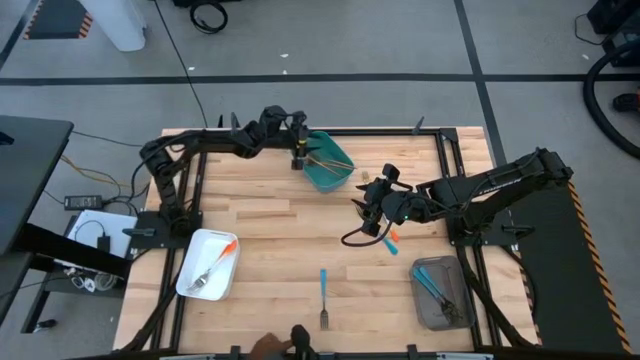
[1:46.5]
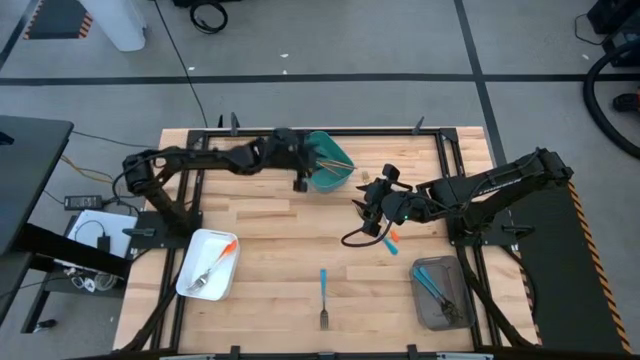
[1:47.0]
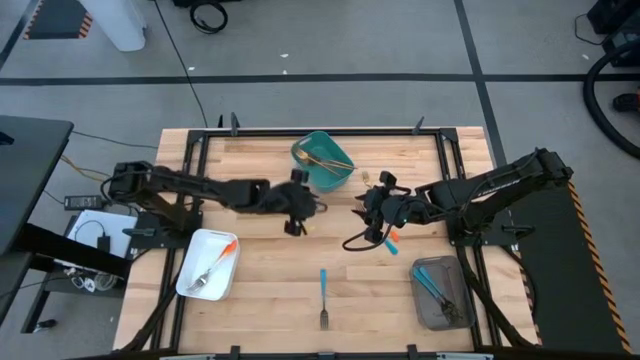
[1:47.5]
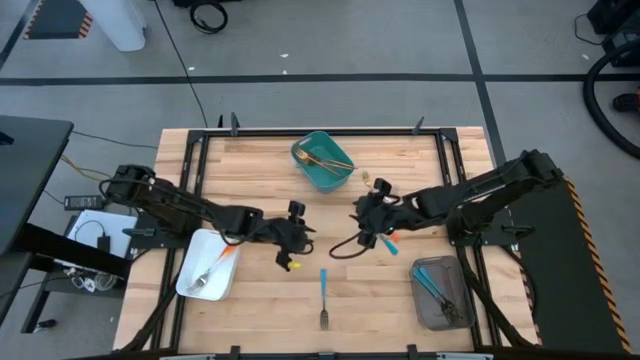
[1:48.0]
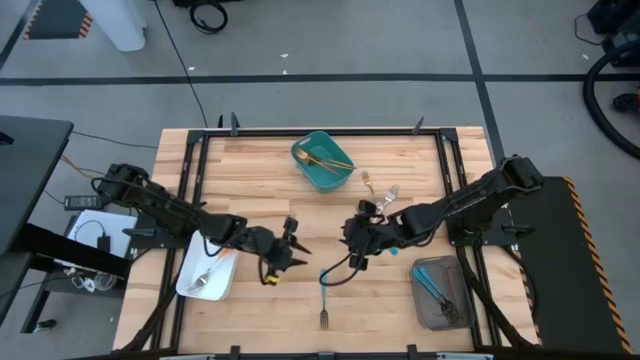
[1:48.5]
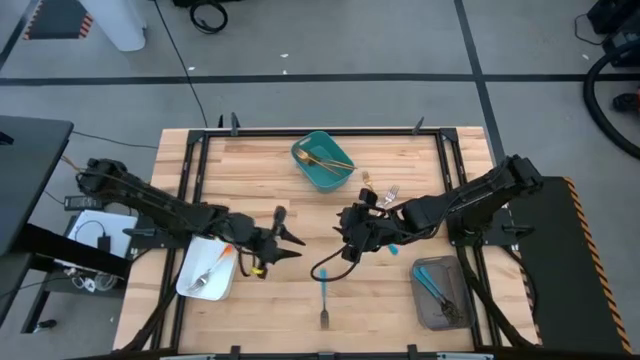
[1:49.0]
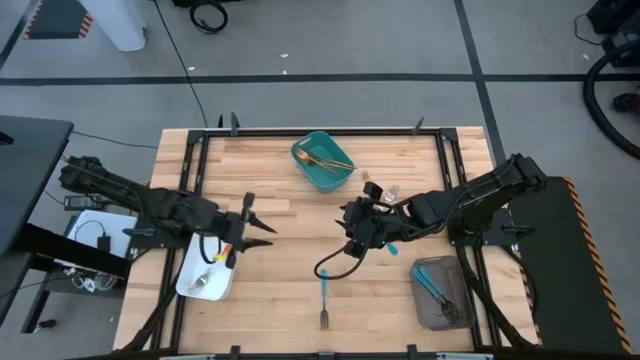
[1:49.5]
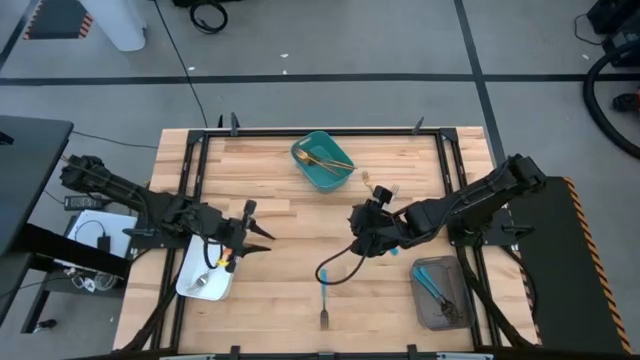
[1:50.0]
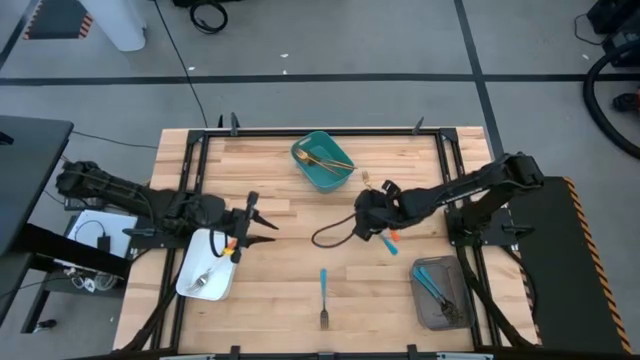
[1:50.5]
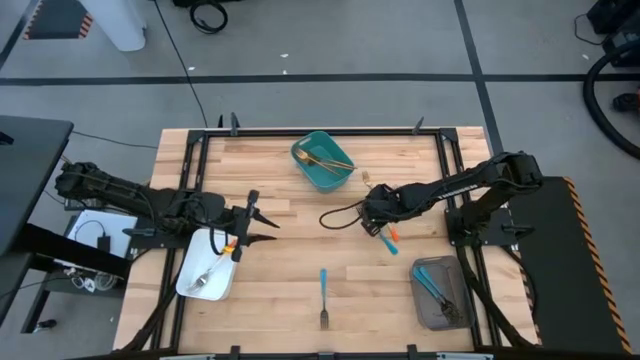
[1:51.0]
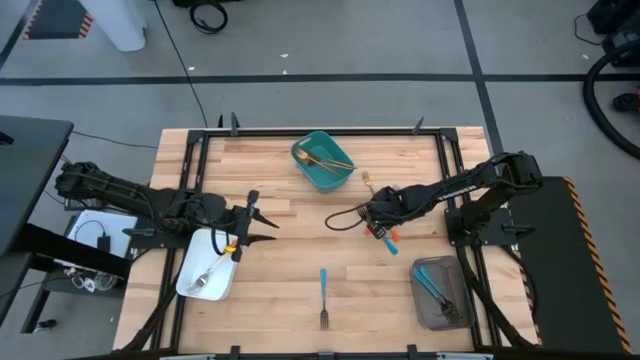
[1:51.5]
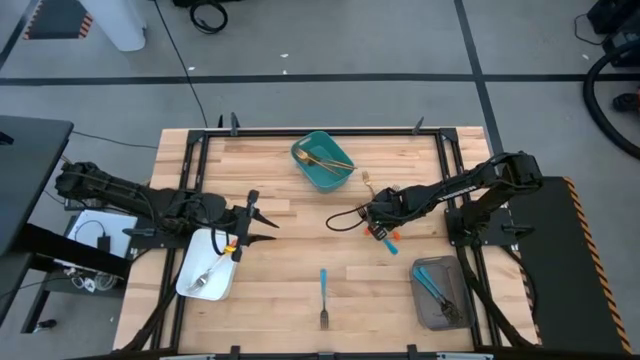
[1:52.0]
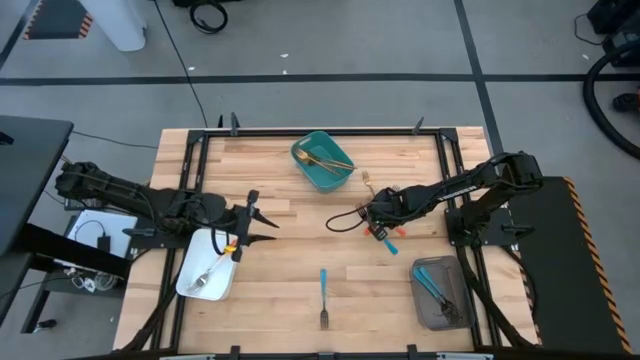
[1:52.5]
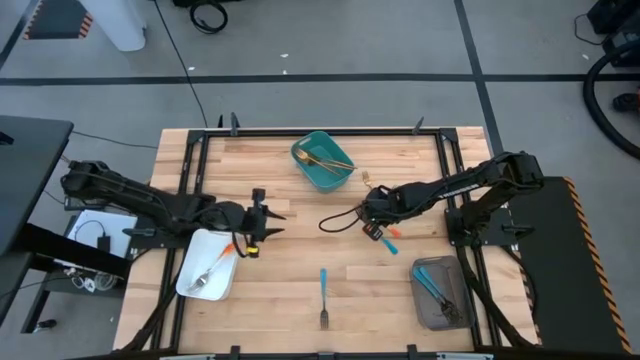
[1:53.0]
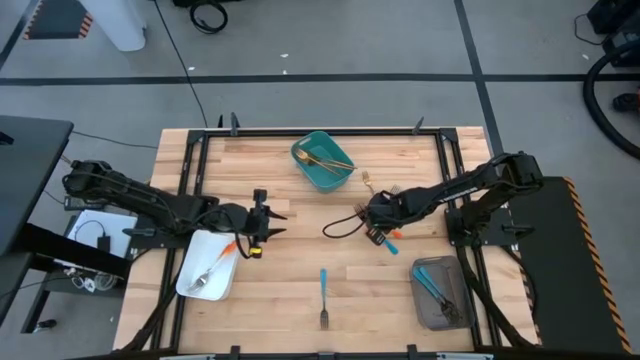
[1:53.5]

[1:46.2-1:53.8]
Task: Sort silverware by color (type)
Put the orange fork into the white bin

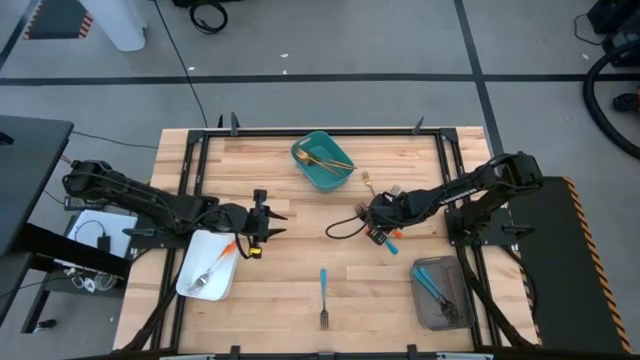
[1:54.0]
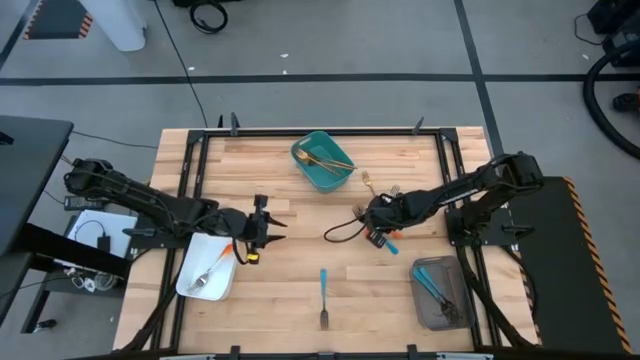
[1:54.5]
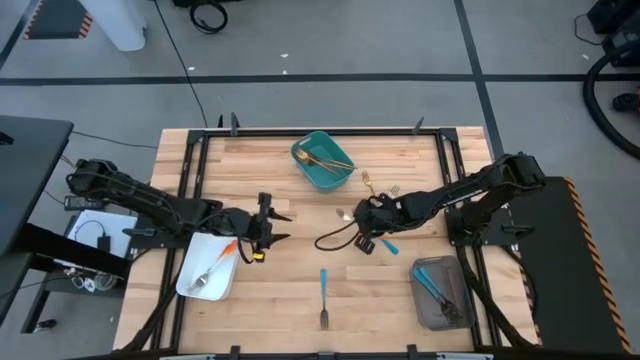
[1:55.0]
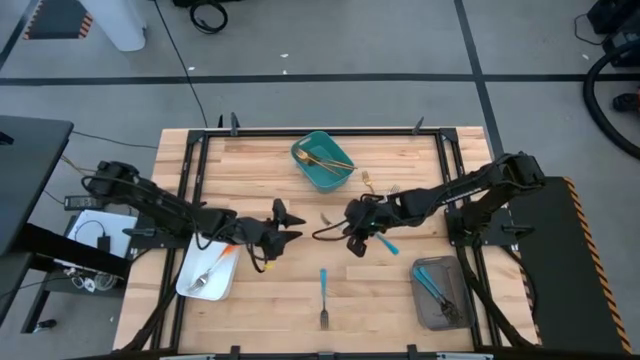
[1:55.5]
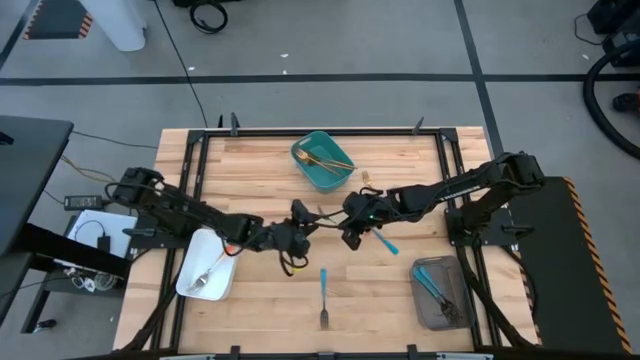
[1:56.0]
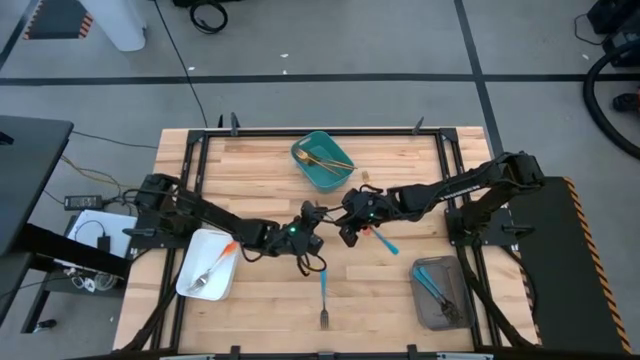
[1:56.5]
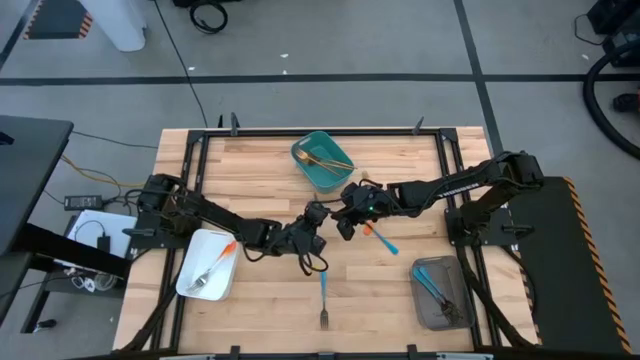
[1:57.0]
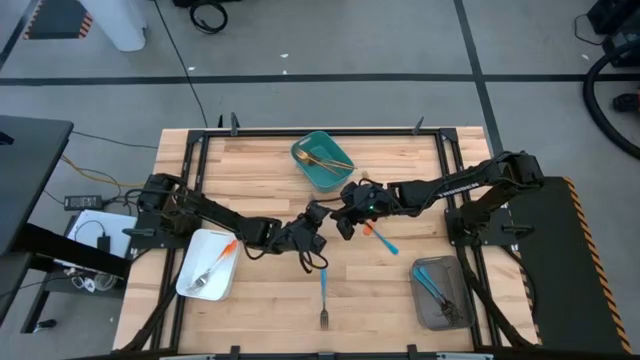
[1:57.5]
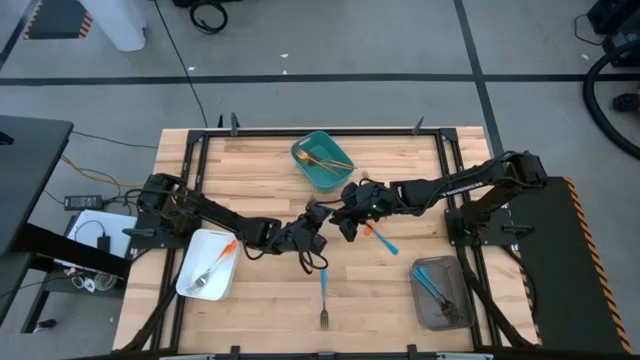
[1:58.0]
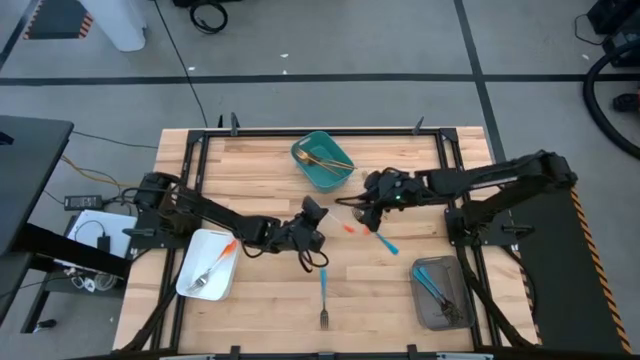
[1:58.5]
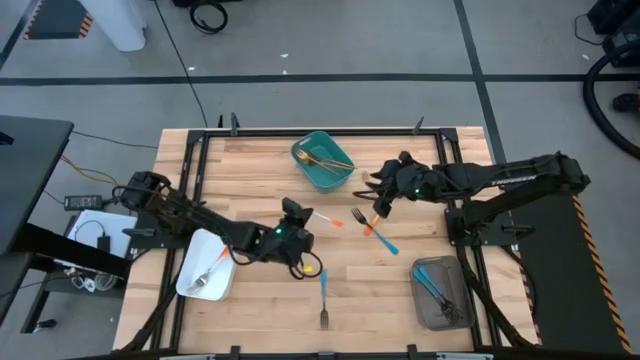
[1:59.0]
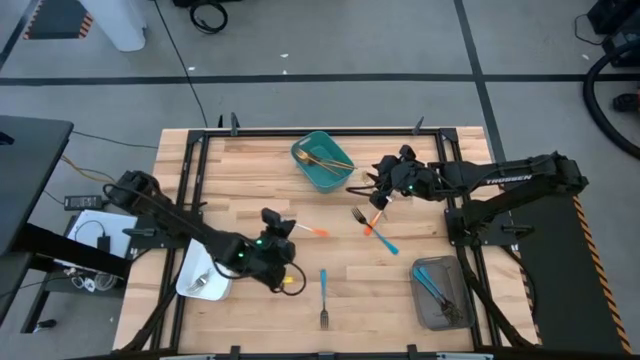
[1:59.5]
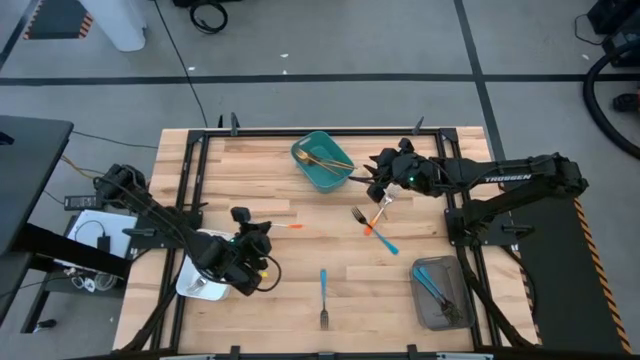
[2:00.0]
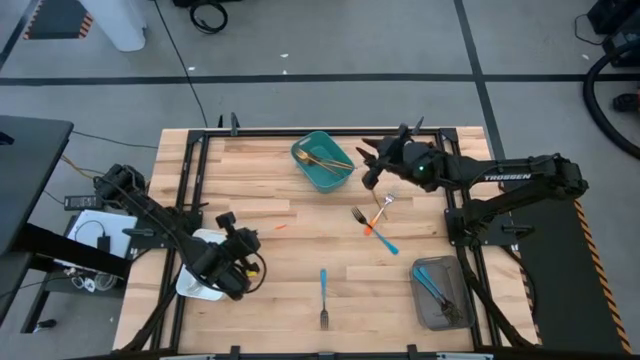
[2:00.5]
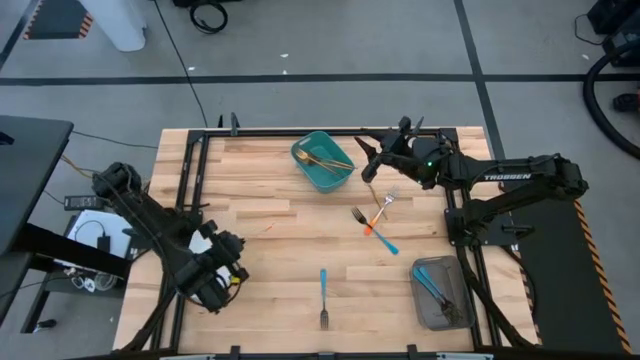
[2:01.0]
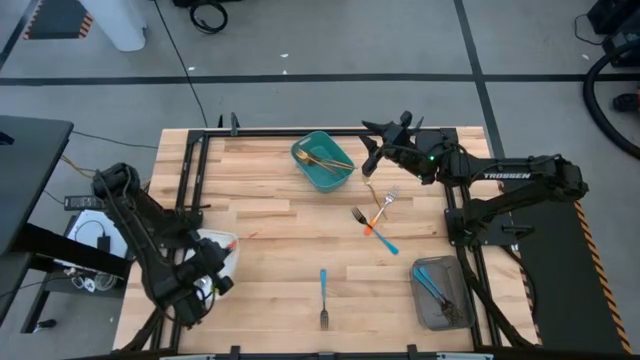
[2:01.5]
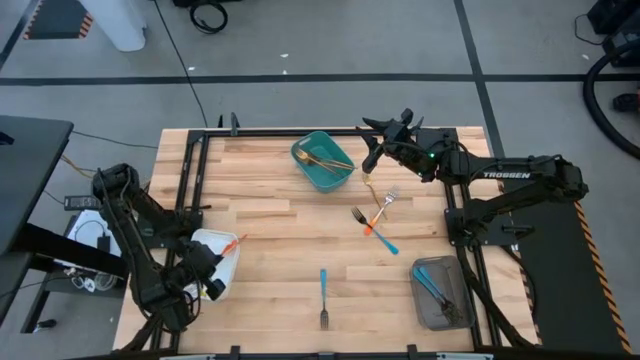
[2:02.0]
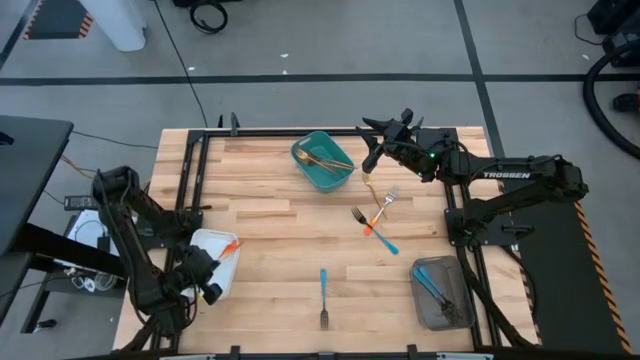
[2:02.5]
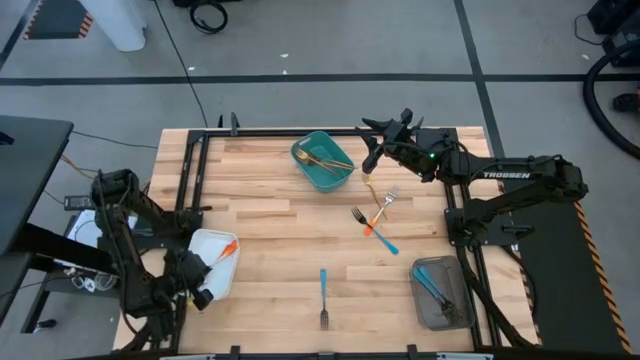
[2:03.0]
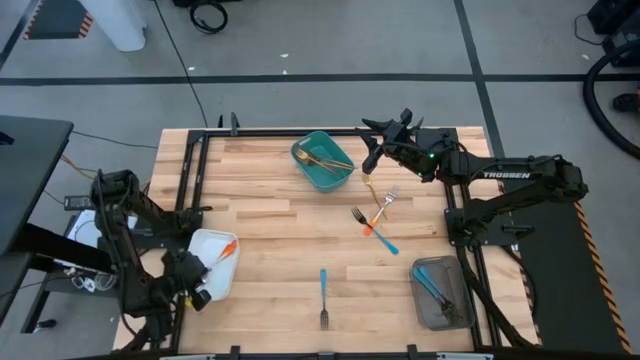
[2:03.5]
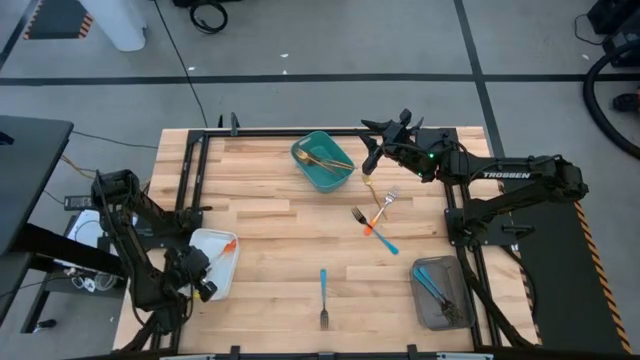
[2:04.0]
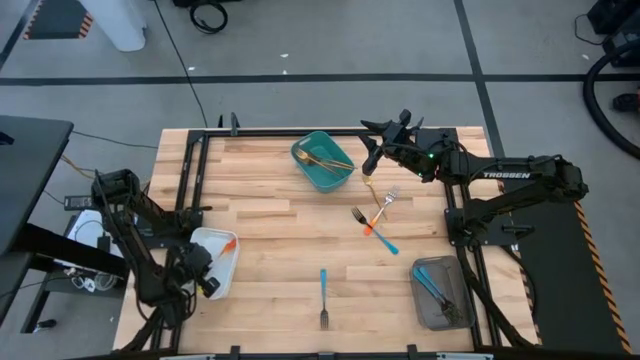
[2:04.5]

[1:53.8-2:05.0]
Put the orange fork into the white bin
